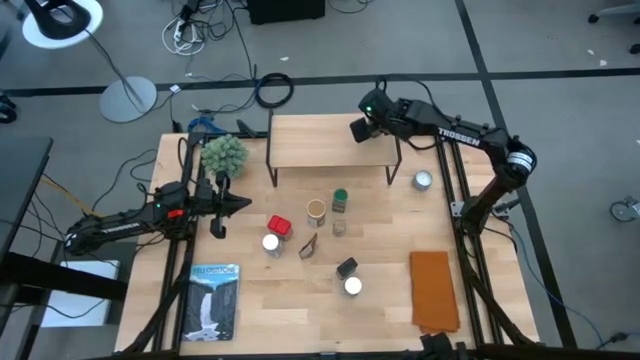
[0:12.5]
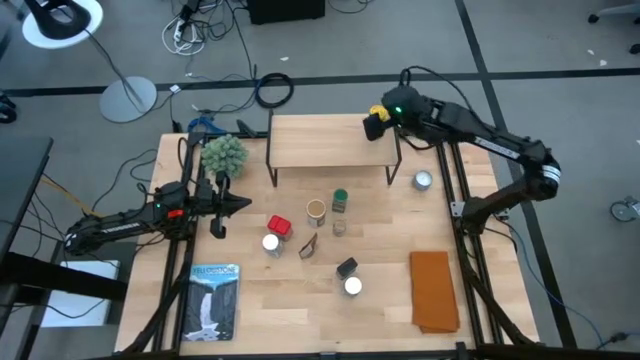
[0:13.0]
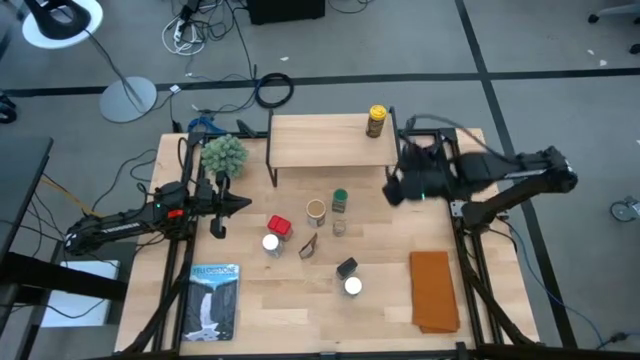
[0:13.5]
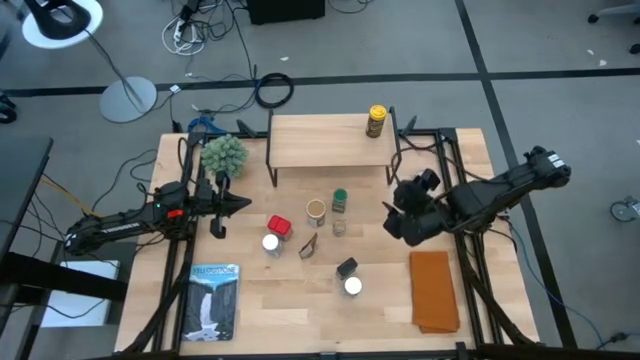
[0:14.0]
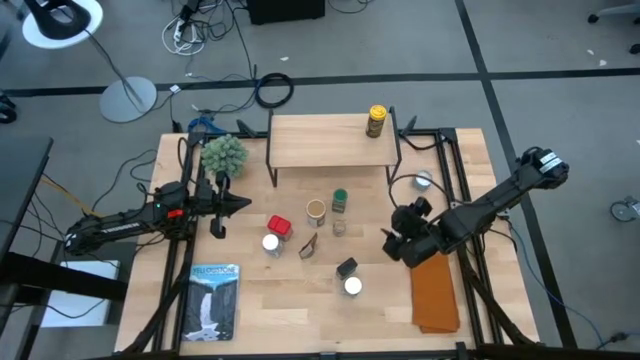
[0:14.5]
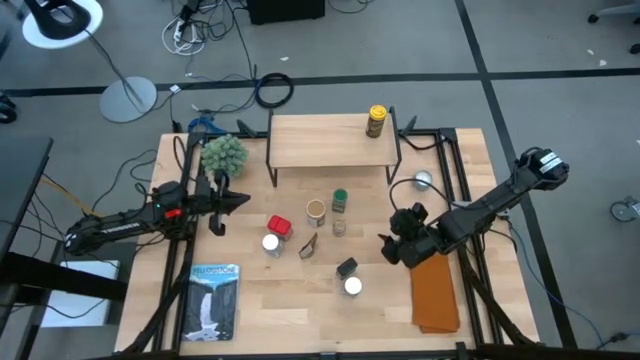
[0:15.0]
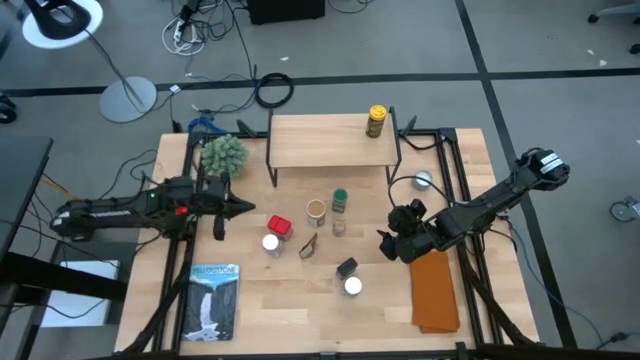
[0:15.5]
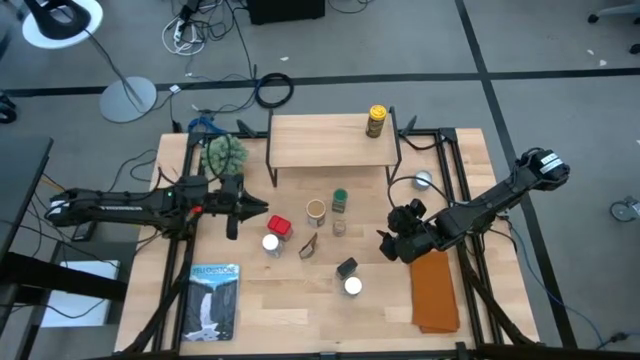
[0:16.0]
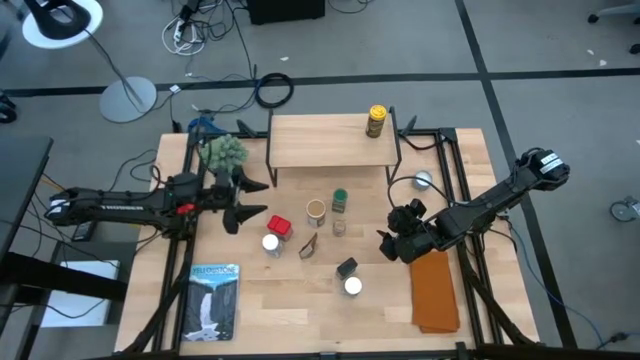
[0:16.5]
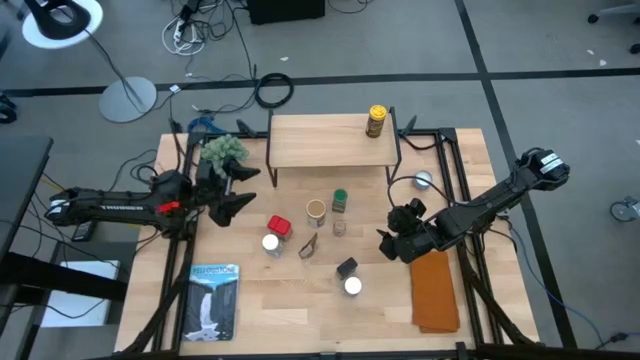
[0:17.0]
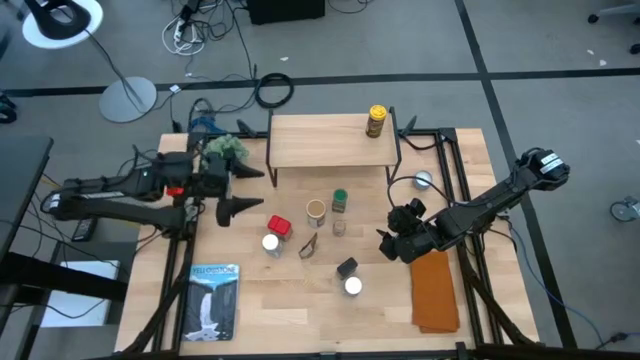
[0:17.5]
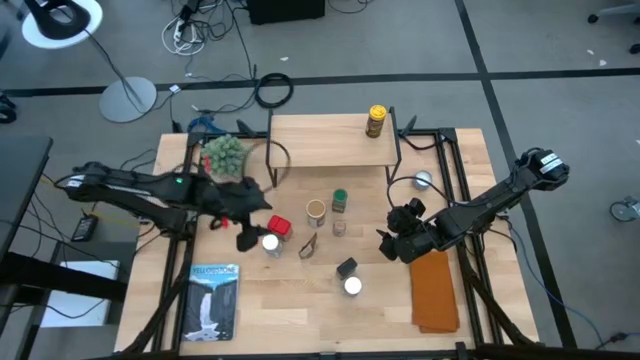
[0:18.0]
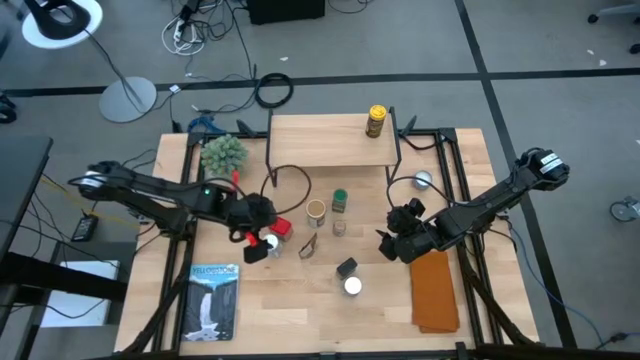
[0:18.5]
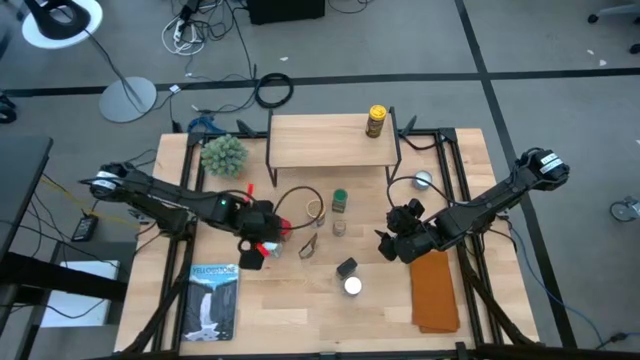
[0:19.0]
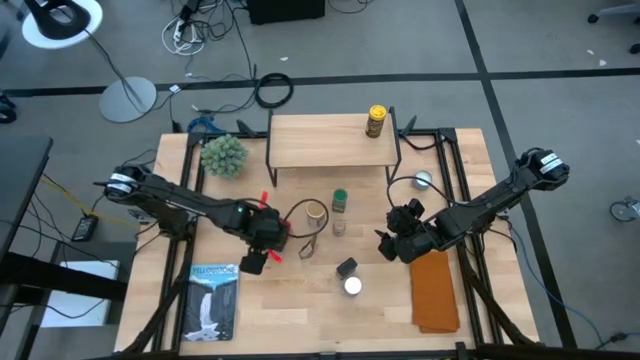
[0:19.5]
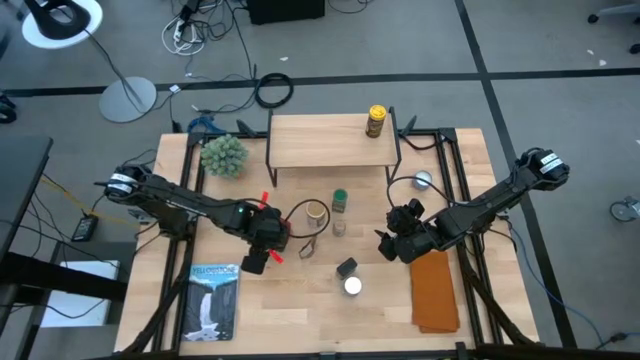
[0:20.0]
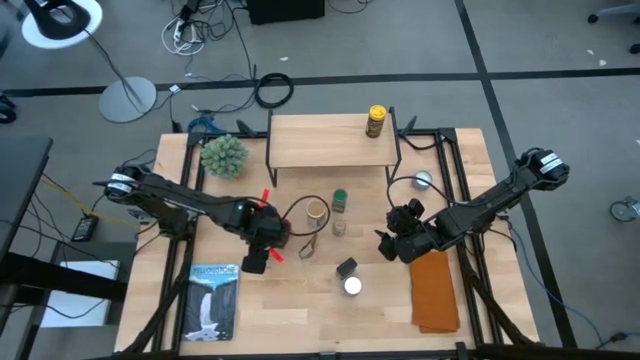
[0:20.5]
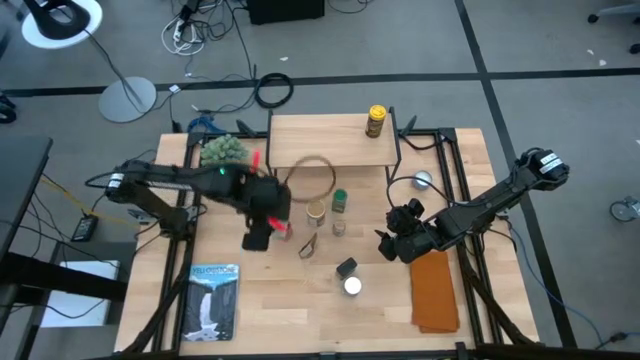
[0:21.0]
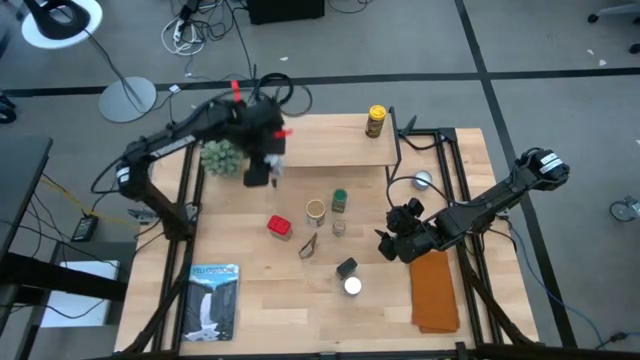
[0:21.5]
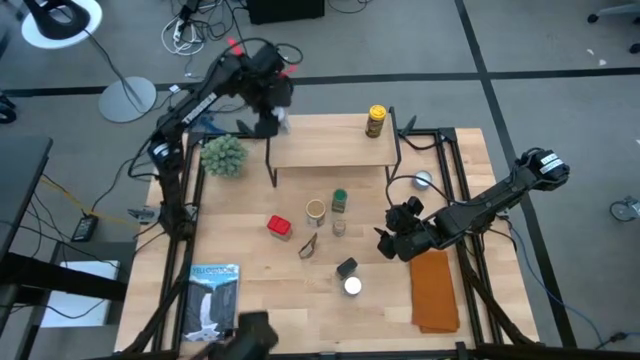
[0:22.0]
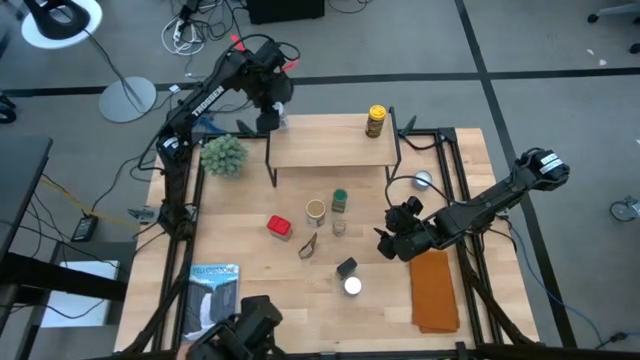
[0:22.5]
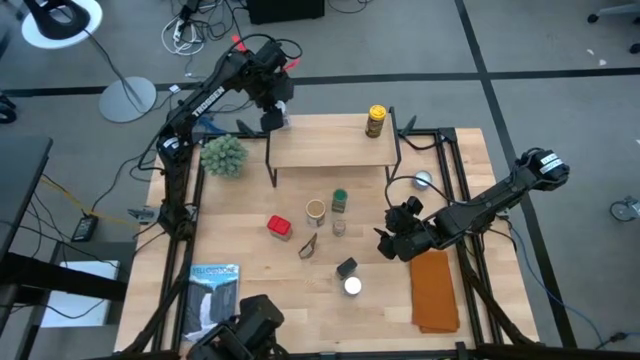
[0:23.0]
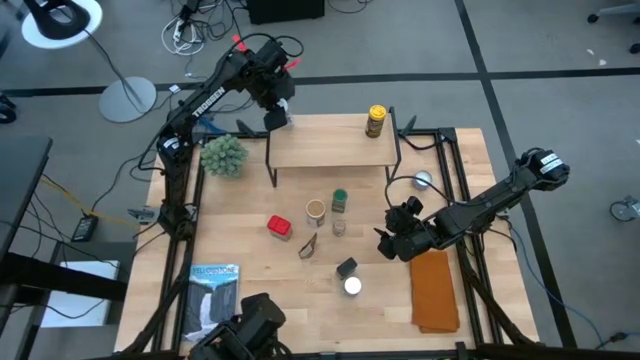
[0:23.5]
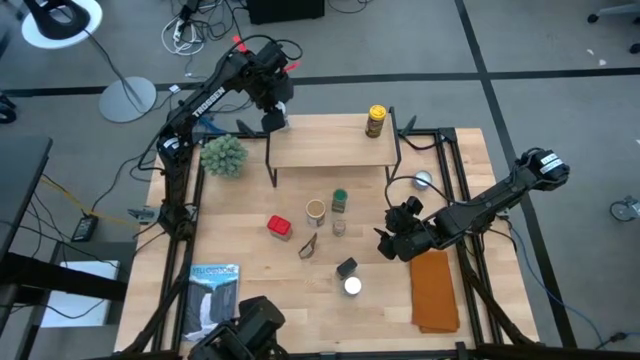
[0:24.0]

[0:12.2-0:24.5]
Task: Shelf spices
Put the top white seasoning bottle on the shelf

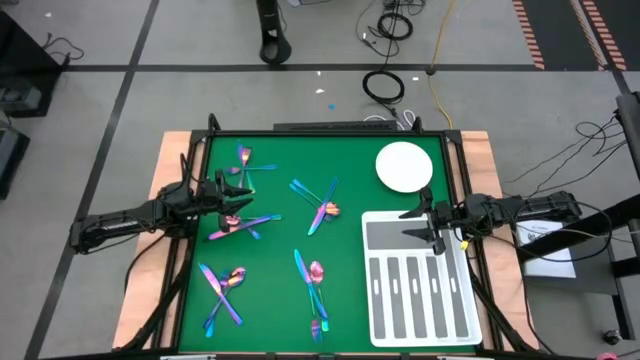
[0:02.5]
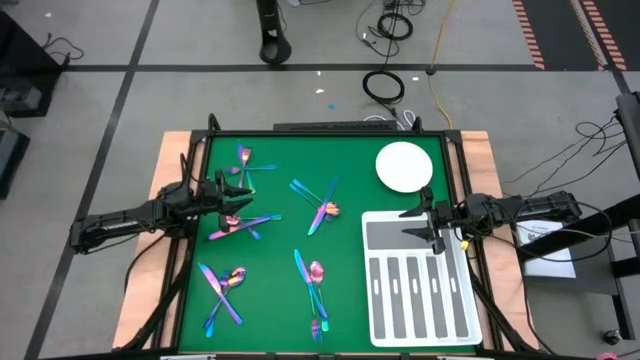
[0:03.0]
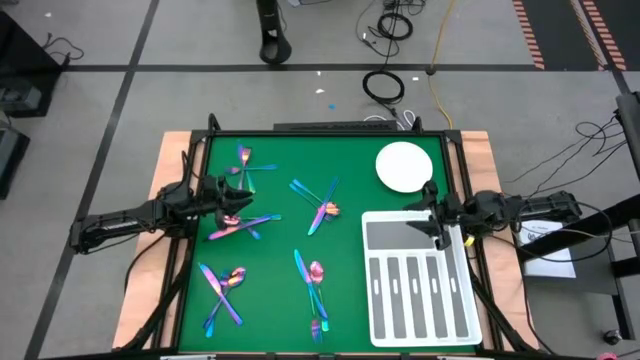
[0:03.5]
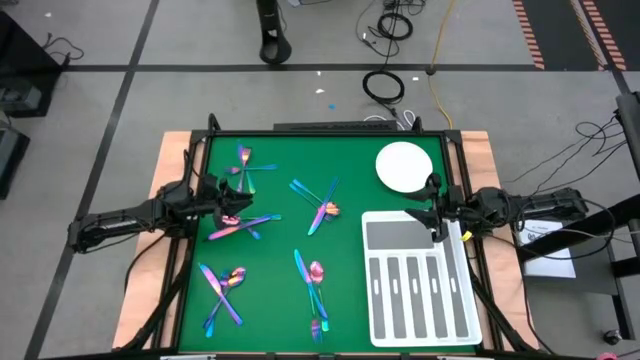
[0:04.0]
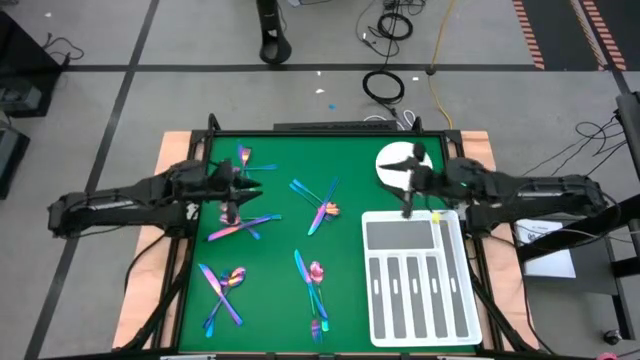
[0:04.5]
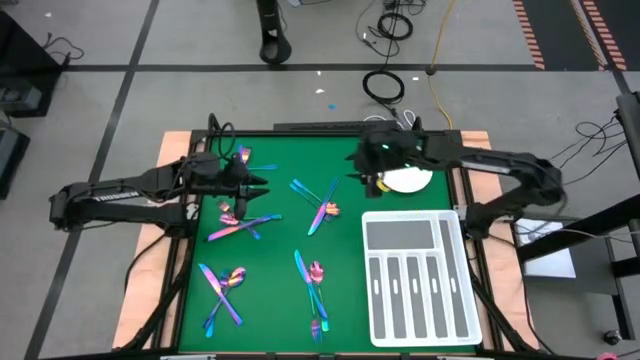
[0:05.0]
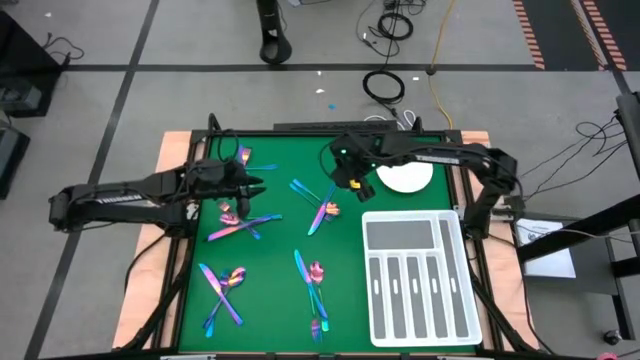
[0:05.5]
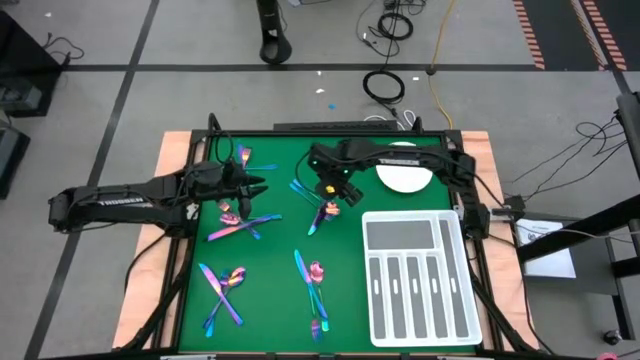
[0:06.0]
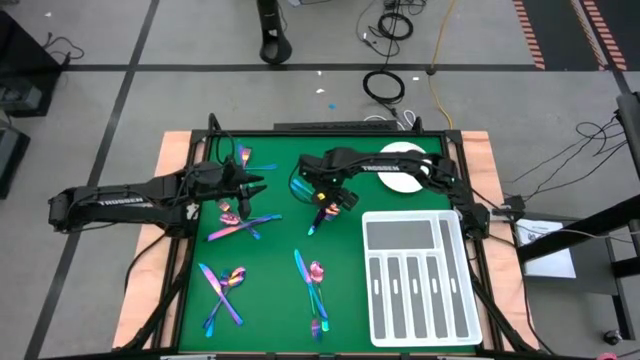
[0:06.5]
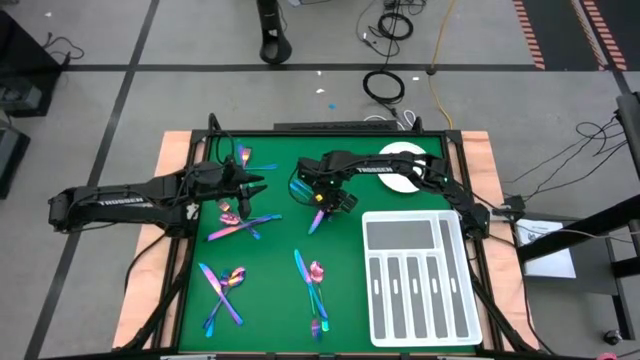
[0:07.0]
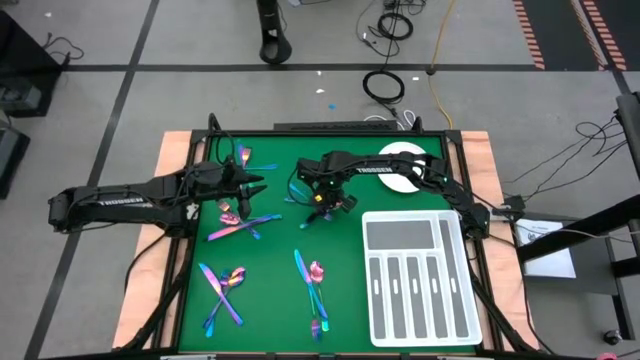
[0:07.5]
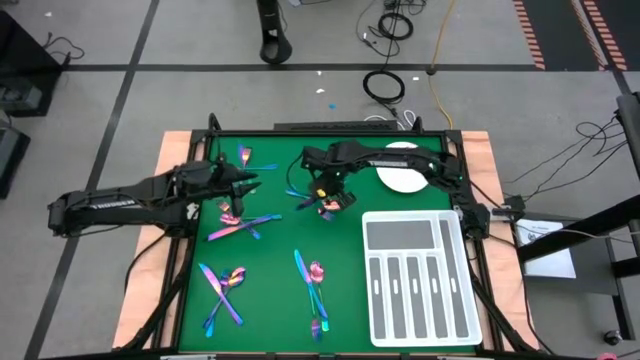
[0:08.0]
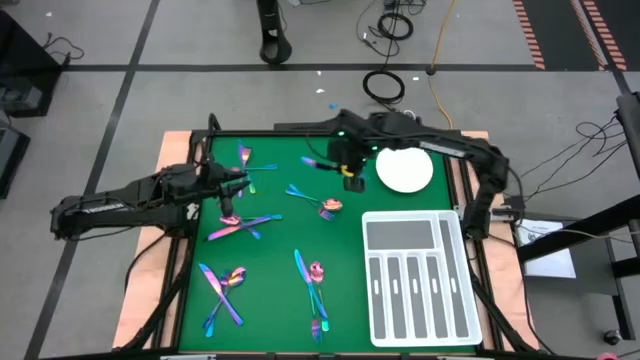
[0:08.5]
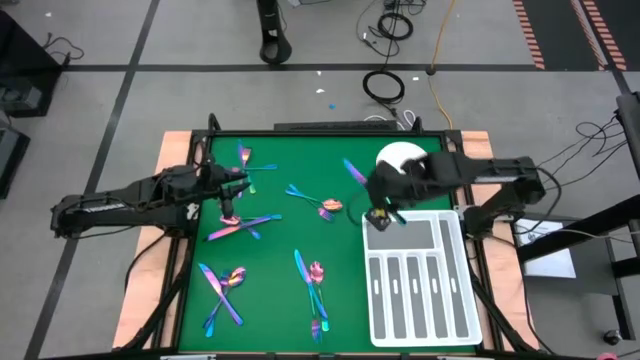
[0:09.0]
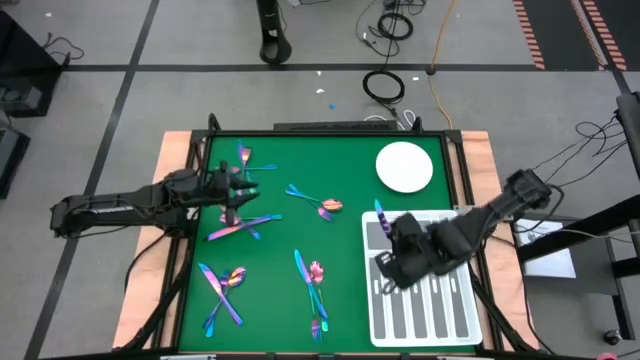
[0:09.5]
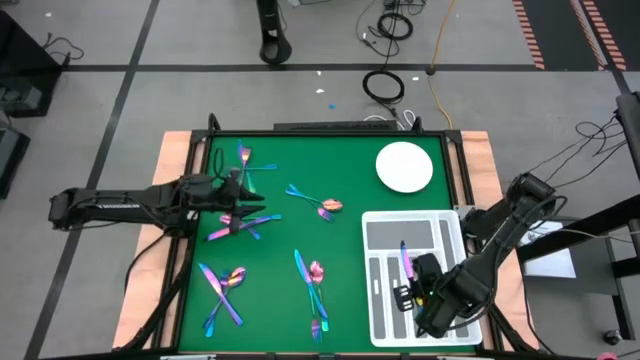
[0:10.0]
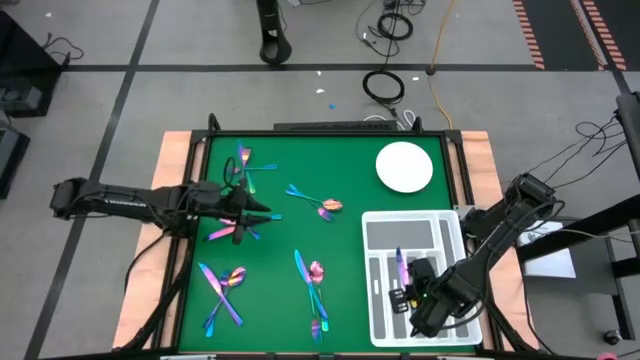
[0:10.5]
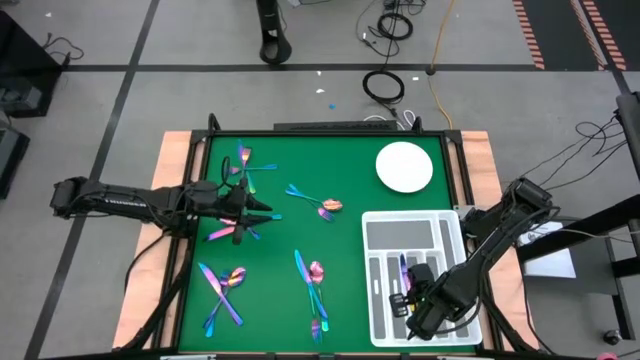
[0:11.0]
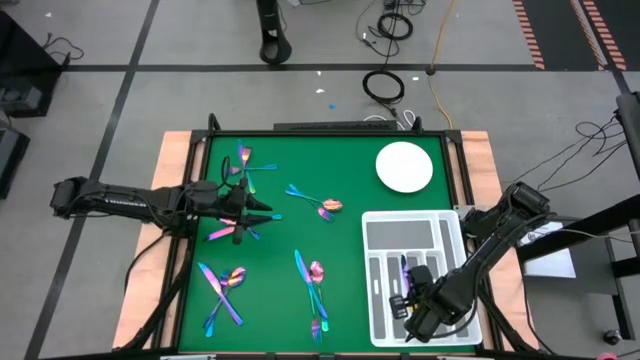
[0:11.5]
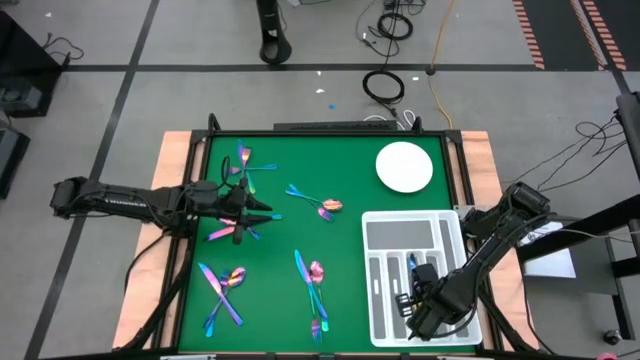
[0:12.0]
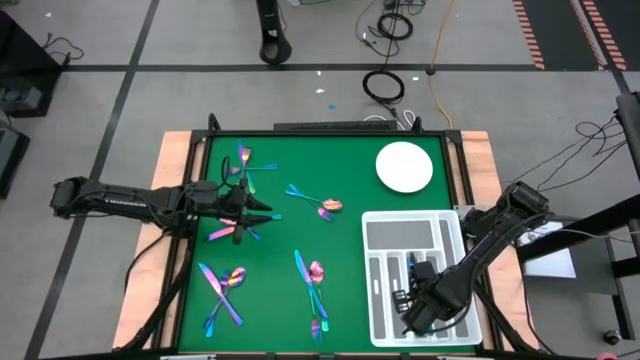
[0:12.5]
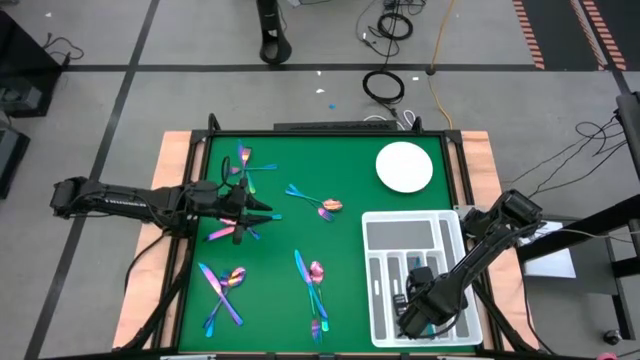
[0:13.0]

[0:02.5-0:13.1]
Task: Sort silverware
Put the top right knife into the utensil organizer
